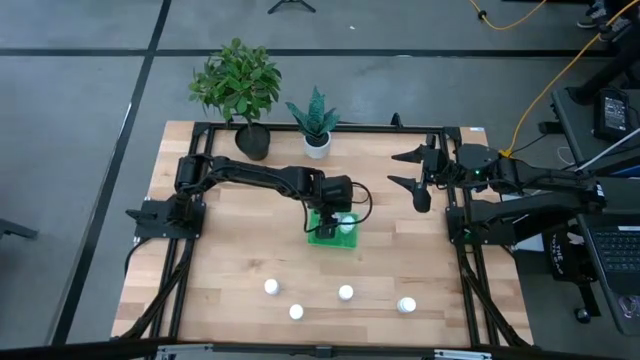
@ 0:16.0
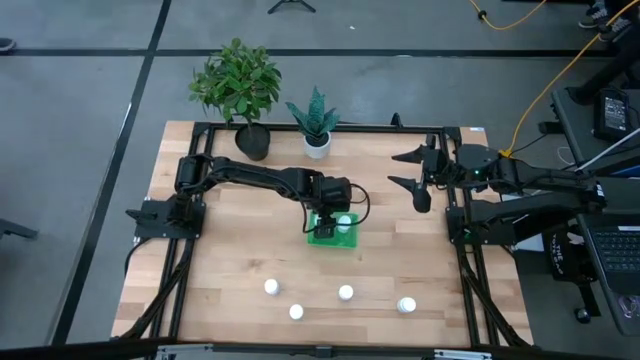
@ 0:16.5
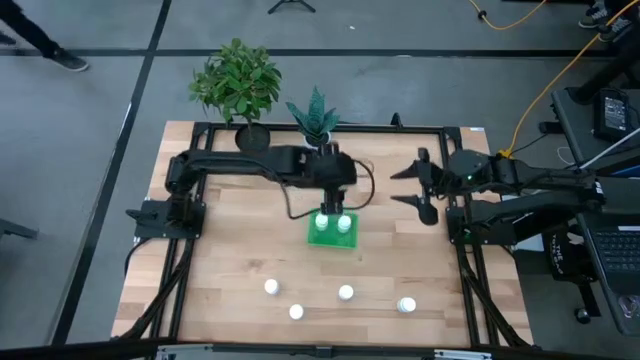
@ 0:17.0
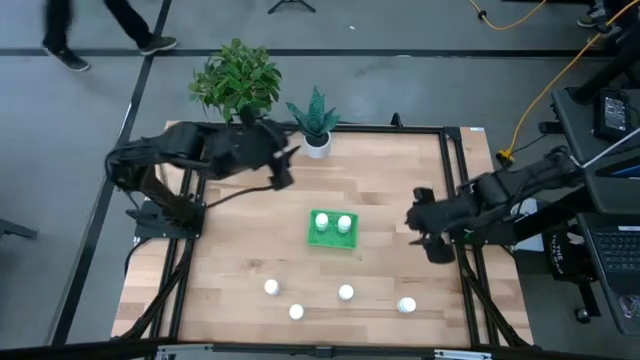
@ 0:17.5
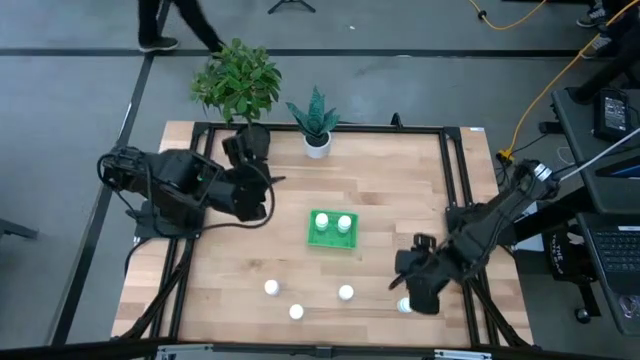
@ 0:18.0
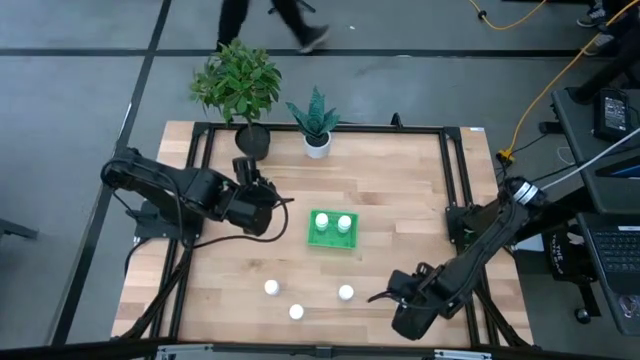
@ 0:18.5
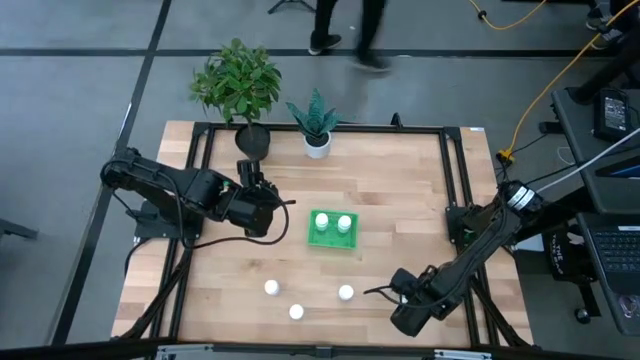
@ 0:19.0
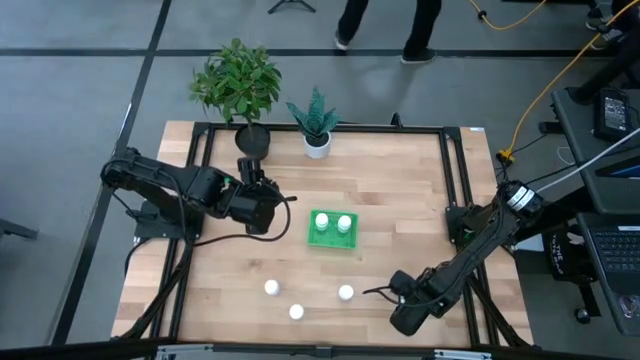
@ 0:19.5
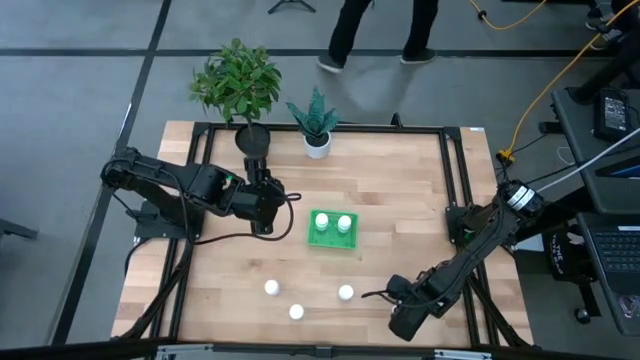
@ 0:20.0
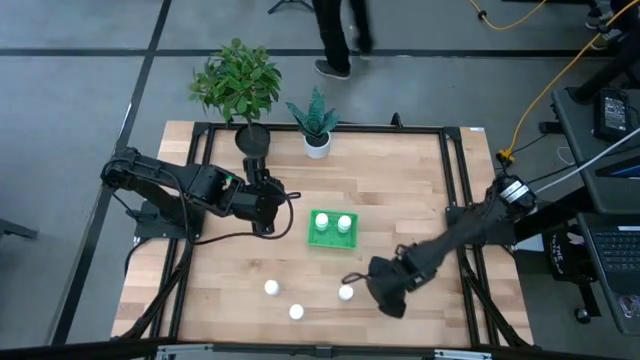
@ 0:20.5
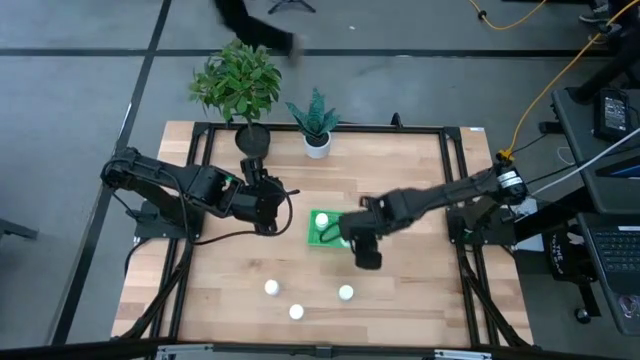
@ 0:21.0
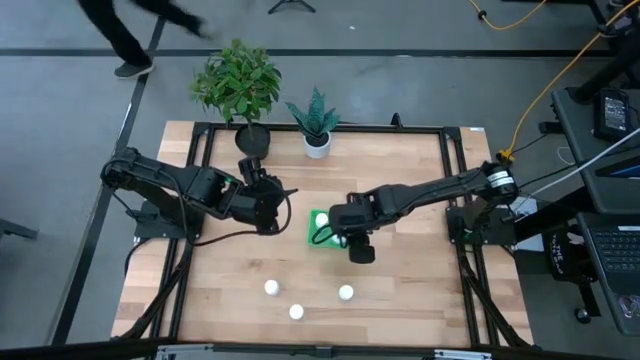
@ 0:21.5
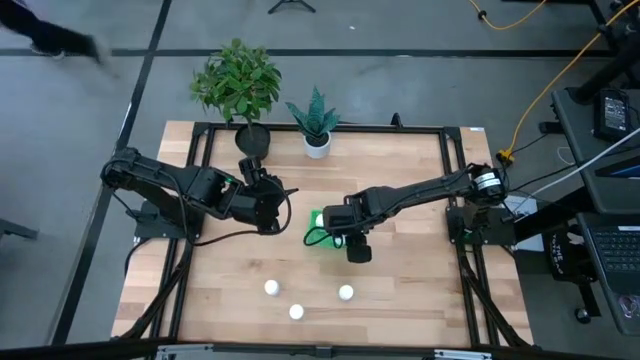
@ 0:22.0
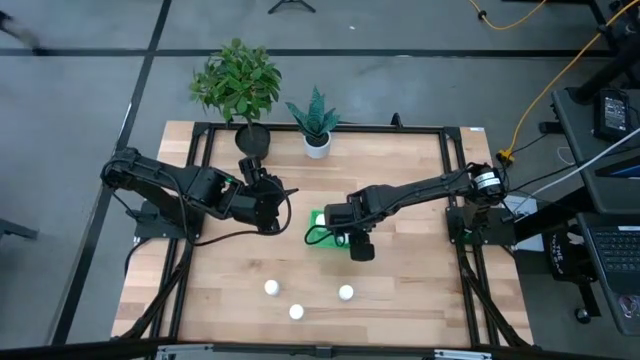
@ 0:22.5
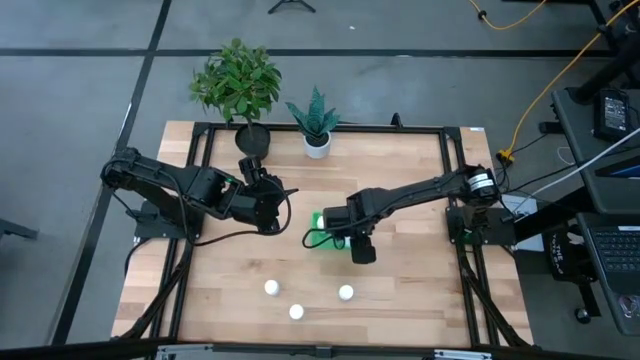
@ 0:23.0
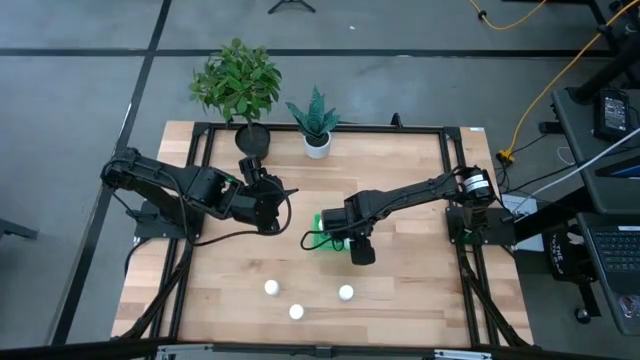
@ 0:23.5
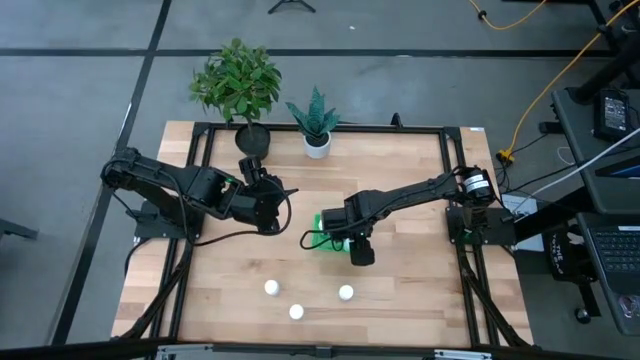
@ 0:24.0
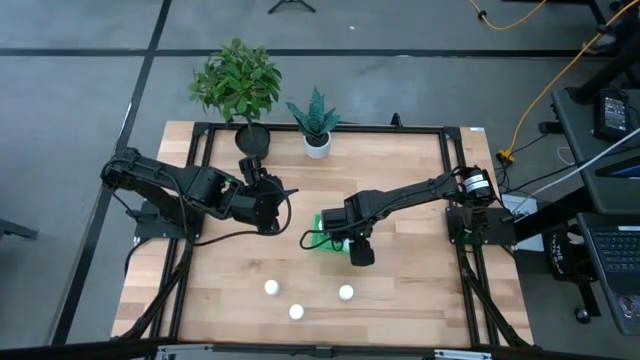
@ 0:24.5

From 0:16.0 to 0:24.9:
Task: Pick and place pill bottles into a basket
Put the white pill bottle into the green basket

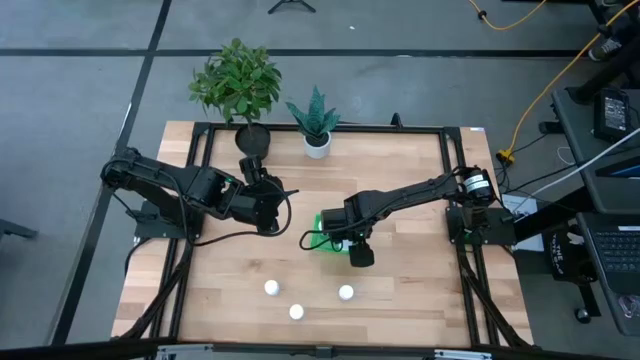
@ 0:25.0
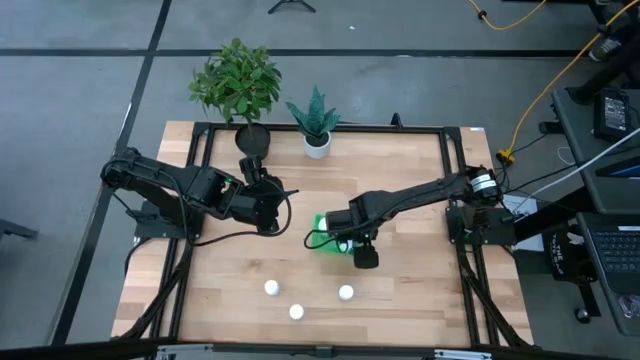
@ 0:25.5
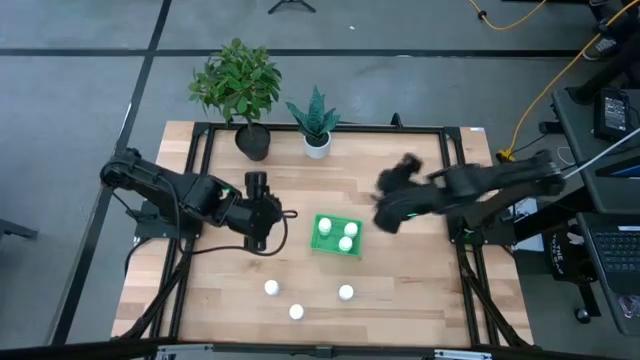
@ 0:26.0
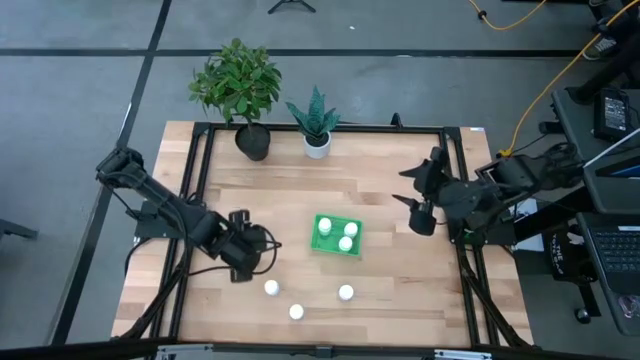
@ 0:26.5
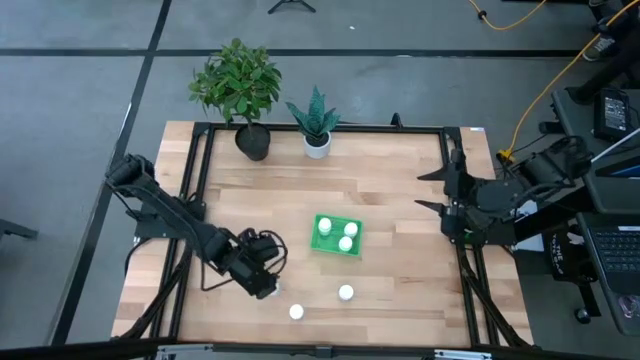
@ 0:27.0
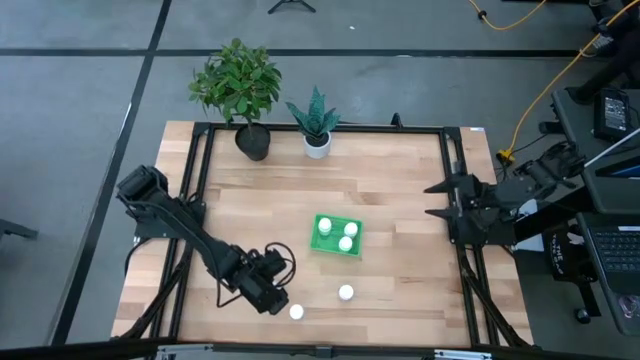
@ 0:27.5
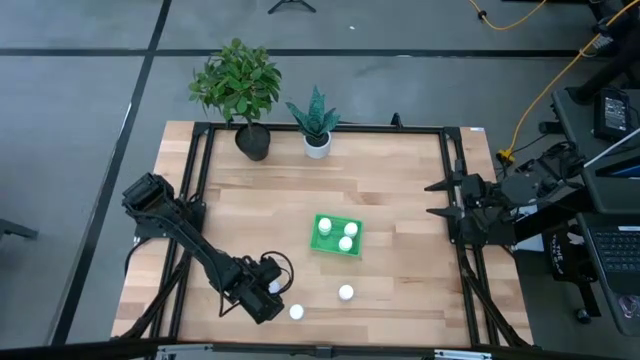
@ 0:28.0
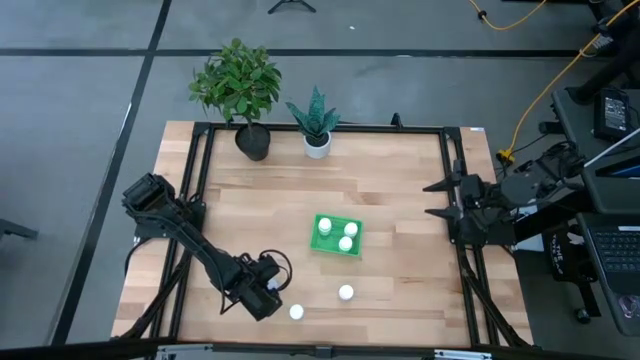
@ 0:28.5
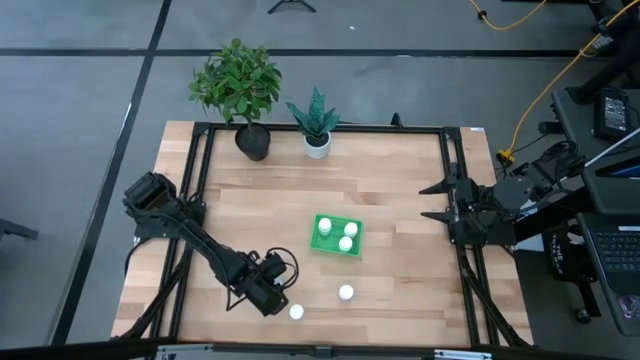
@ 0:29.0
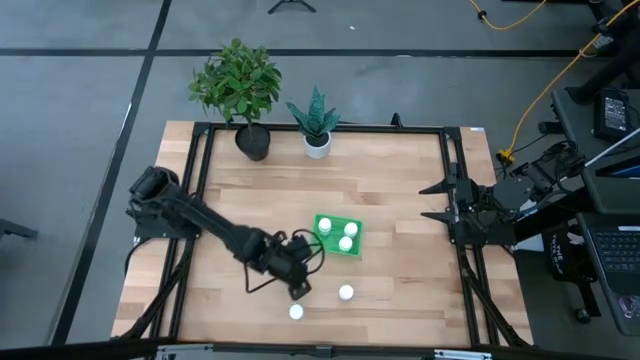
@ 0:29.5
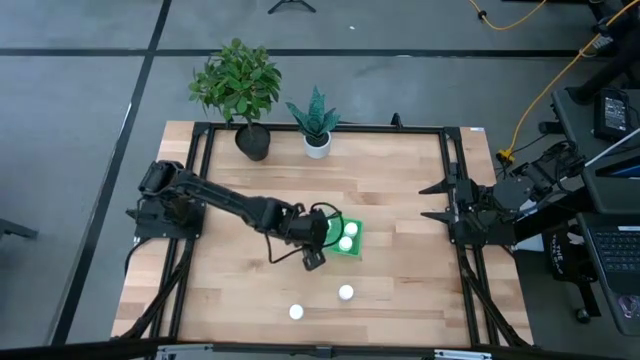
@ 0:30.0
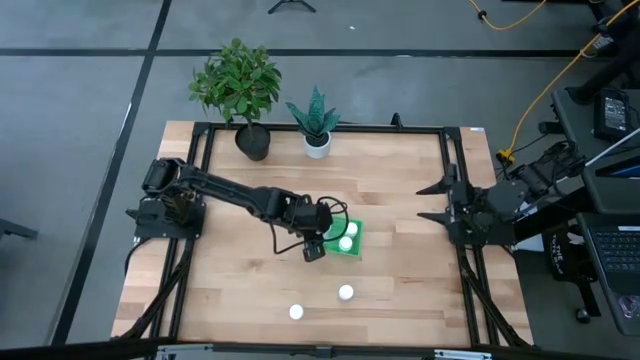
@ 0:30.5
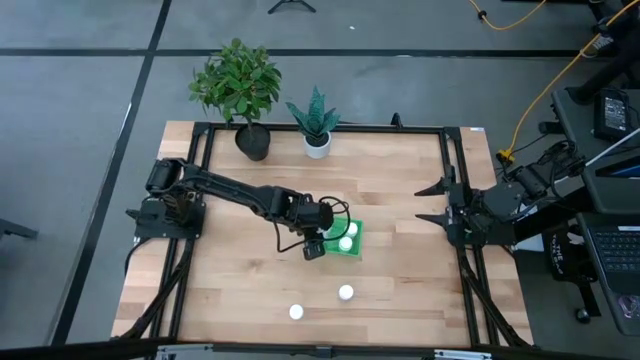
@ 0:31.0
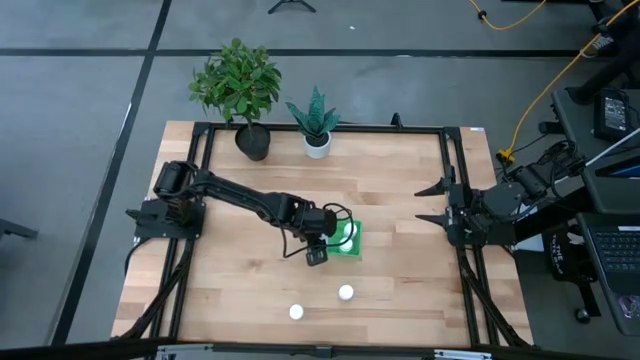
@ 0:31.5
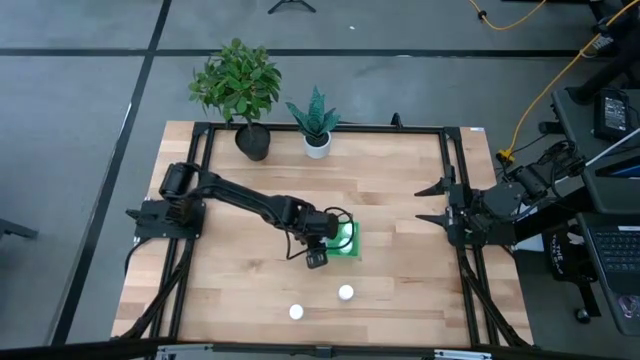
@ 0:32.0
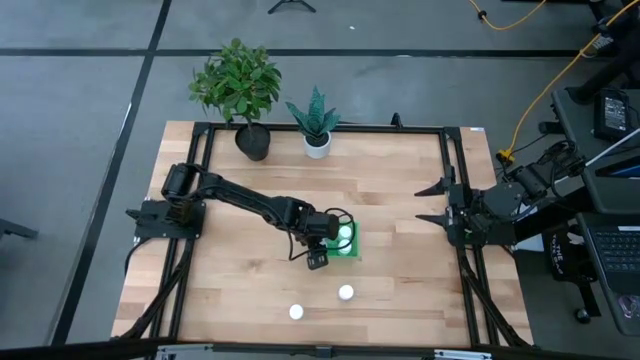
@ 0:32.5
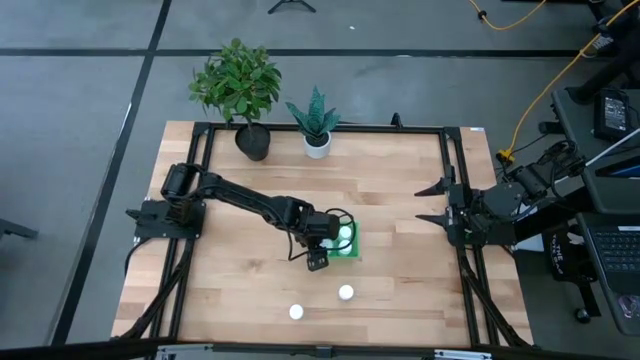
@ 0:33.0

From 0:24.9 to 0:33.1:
Put the white pill bottle into the green basket

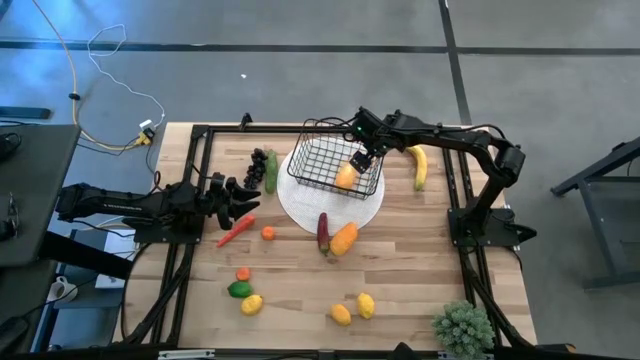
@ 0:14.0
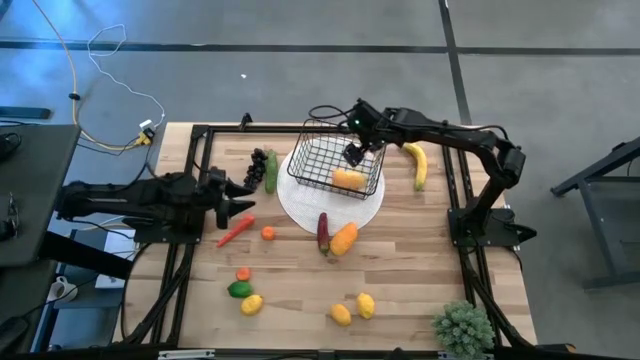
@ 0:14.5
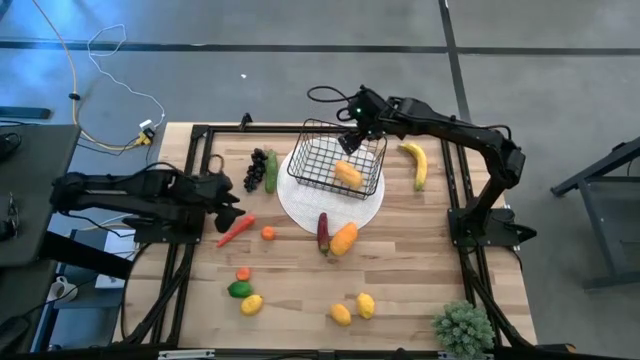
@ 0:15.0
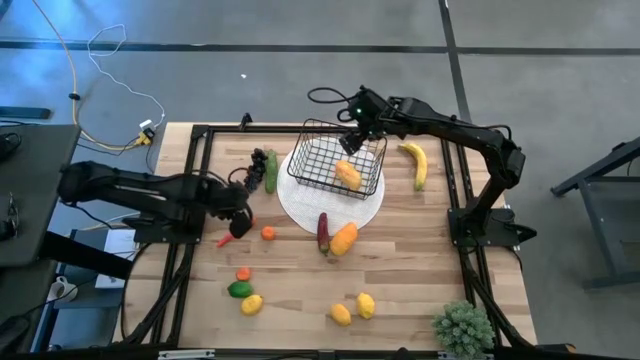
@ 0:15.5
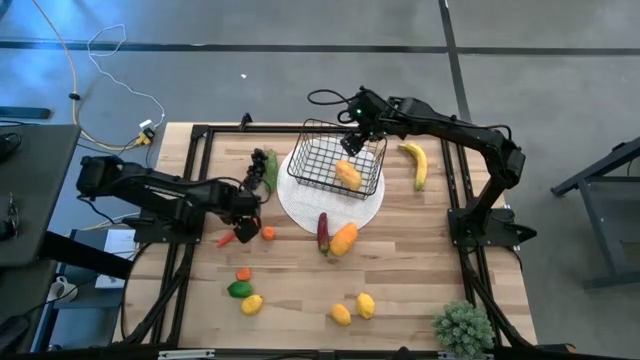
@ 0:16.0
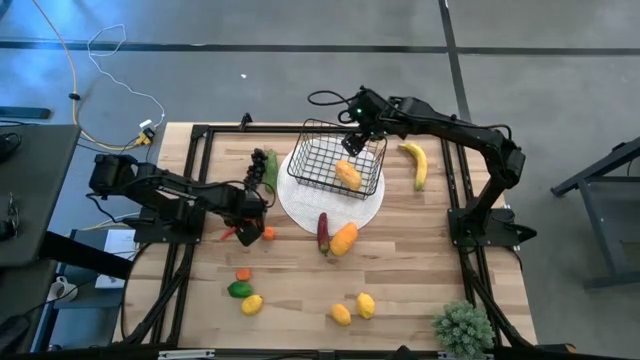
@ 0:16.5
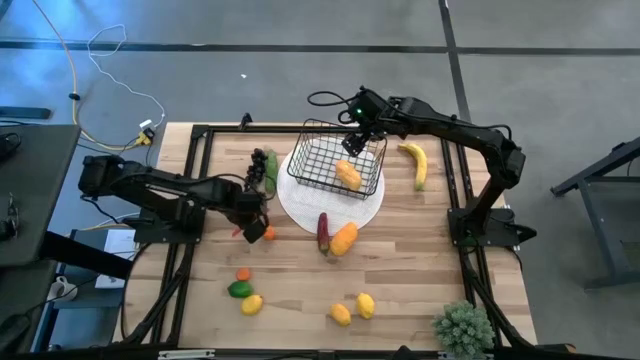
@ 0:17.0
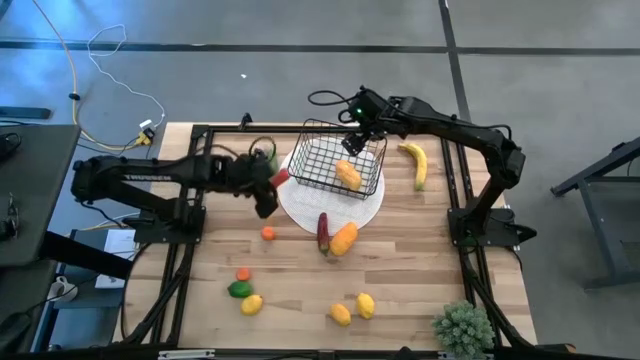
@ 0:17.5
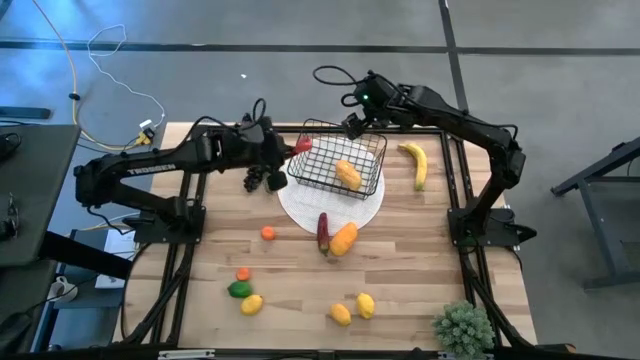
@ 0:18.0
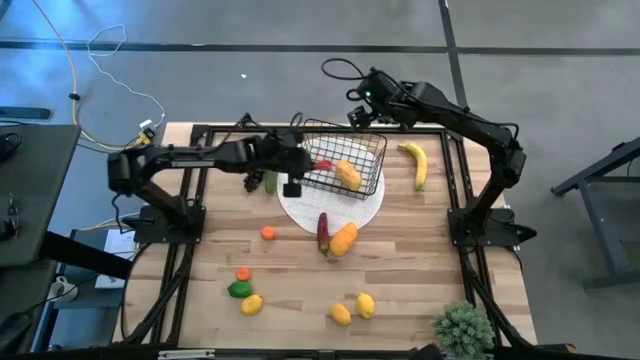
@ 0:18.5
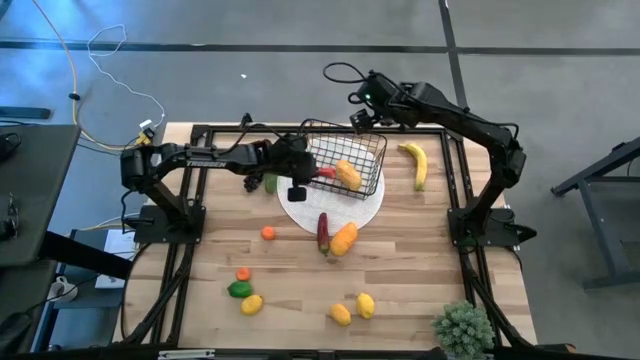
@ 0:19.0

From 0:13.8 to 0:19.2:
Task: Build produce basket
Put the carrot into the wire basket
